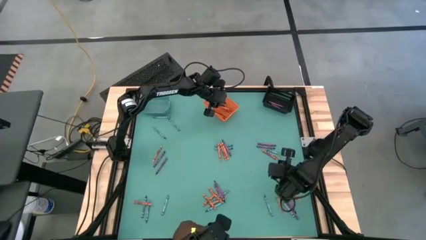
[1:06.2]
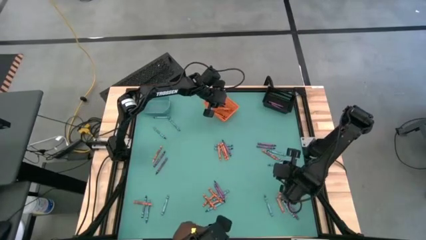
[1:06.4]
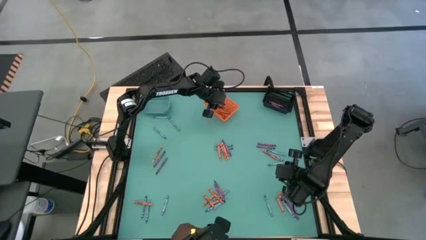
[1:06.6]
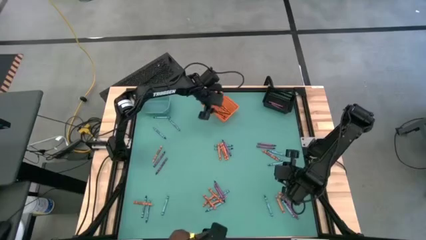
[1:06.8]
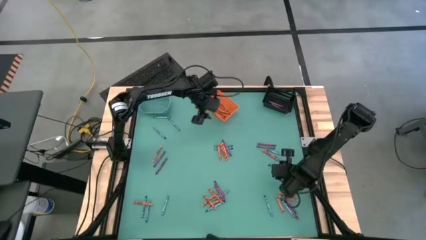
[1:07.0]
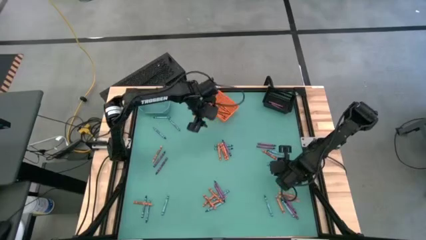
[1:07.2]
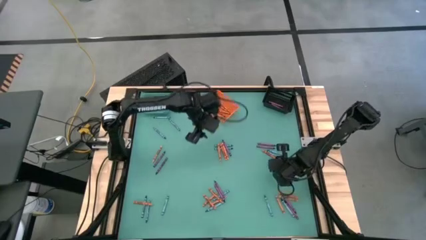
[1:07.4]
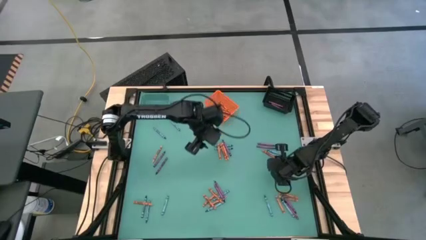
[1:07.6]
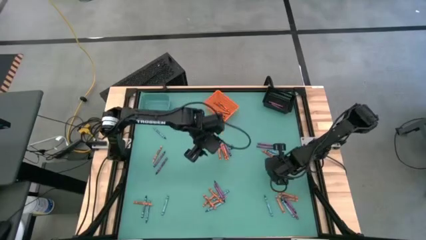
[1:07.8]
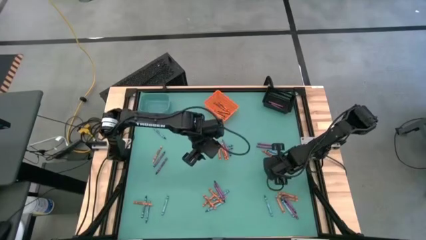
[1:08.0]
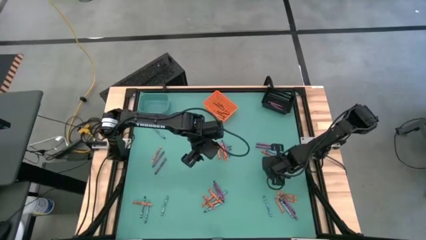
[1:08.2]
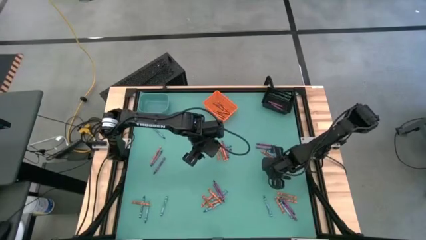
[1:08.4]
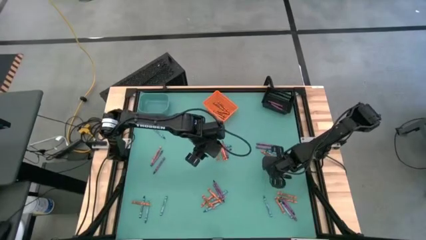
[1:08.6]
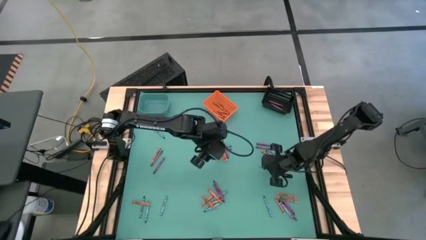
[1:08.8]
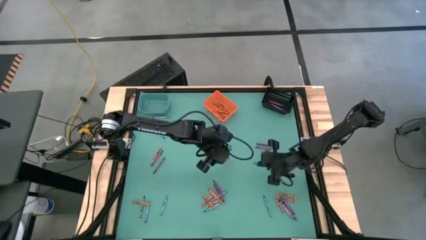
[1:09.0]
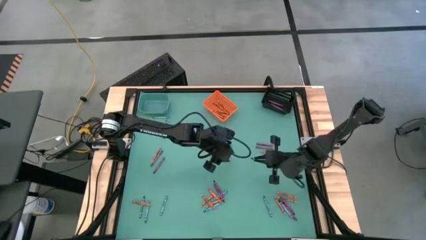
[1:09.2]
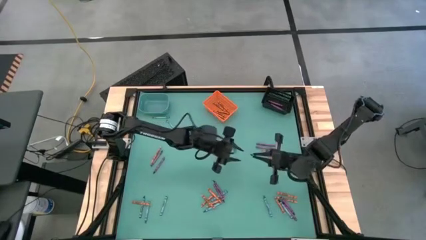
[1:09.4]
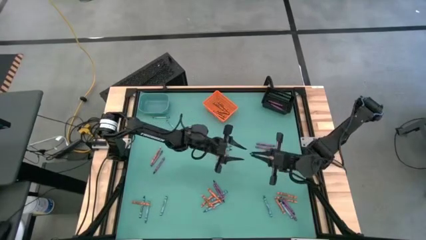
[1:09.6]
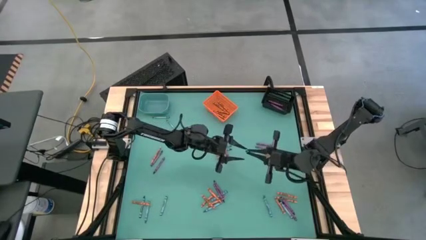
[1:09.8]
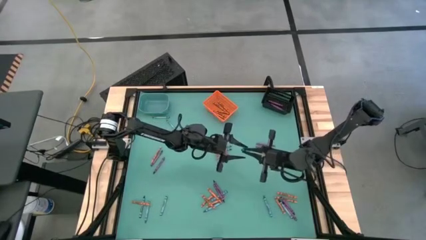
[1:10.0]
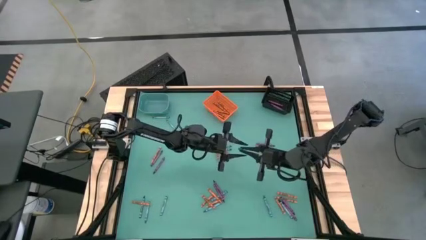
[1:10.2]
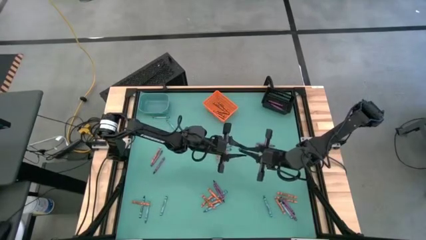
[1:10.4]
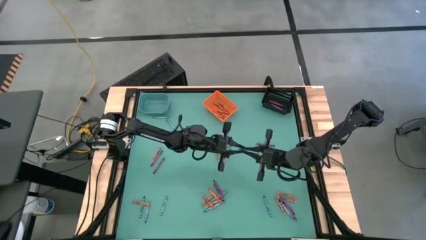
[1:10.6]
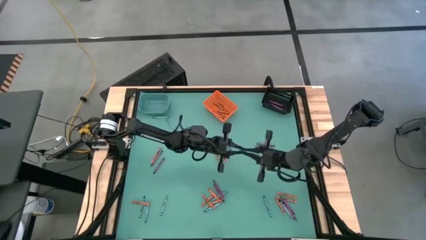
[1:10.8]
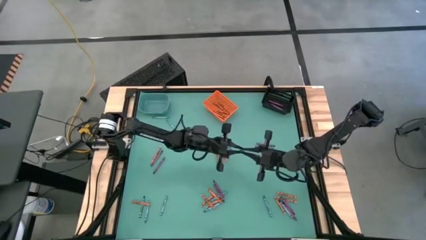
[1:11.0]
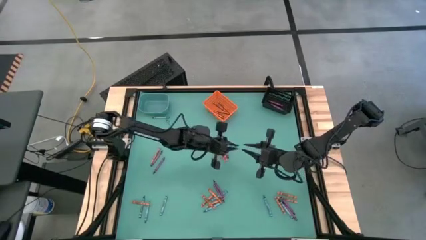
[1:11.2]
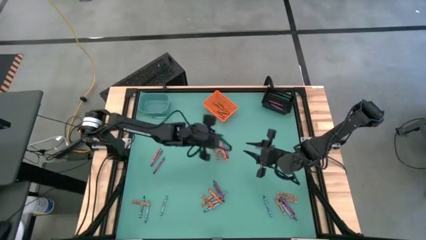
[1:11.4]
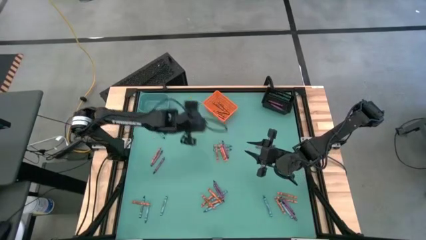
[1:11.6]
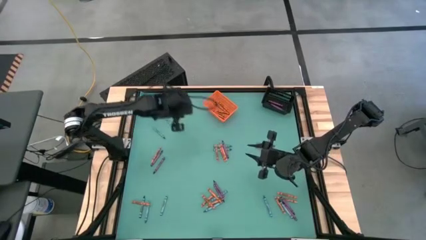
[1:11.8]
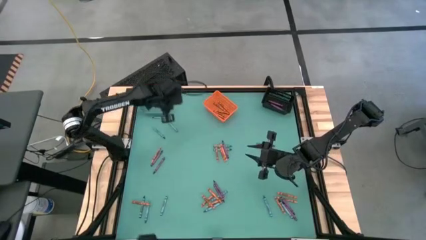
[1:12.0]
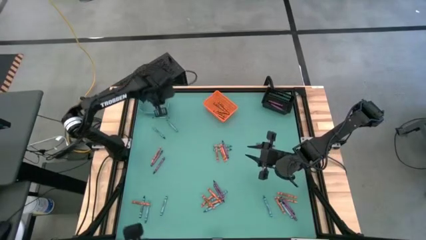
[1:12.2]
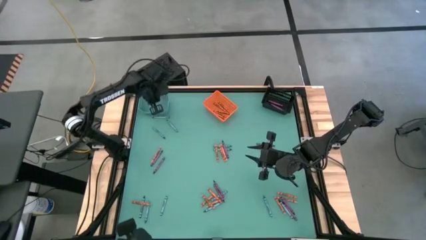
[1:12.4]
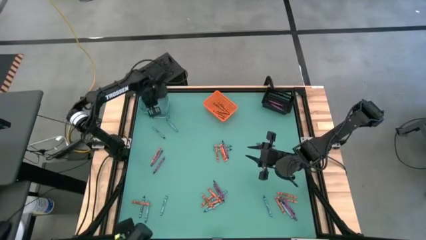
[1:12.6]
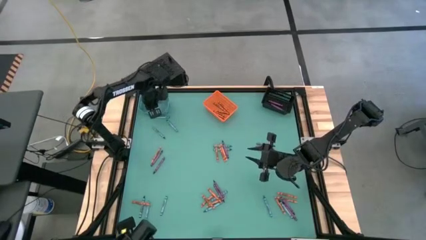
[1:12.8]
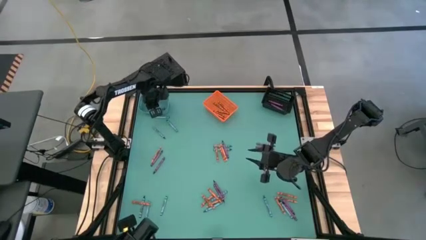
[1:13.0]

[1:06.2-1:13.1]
Task: Sort crayons
Put the blue crayon into the blue bin

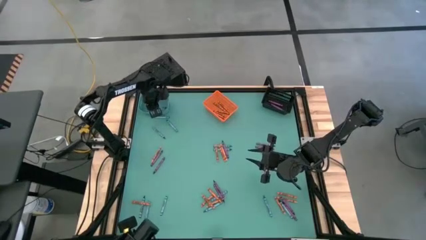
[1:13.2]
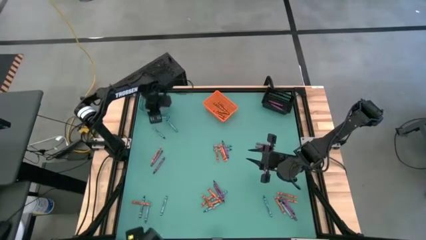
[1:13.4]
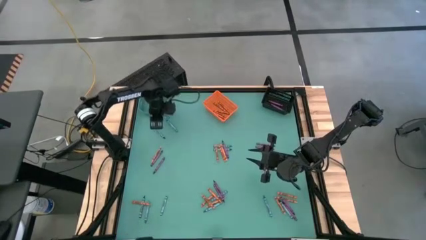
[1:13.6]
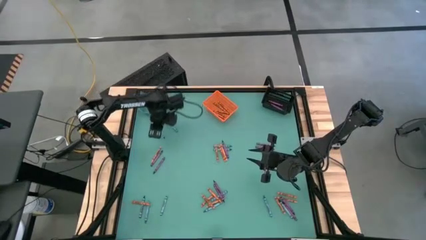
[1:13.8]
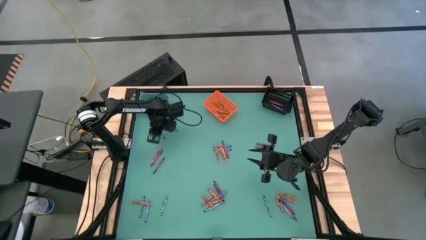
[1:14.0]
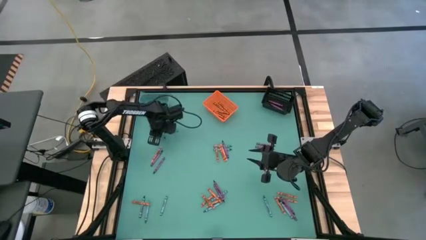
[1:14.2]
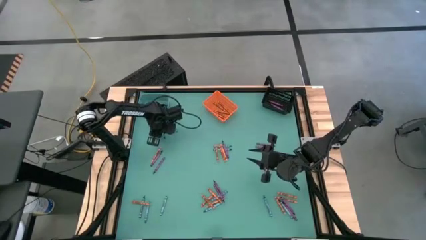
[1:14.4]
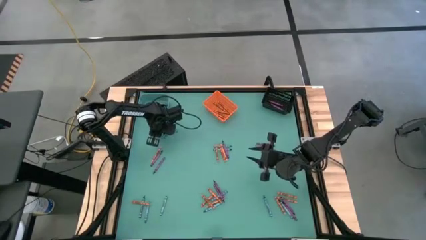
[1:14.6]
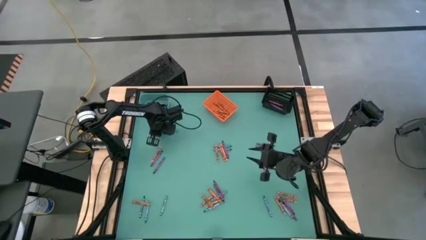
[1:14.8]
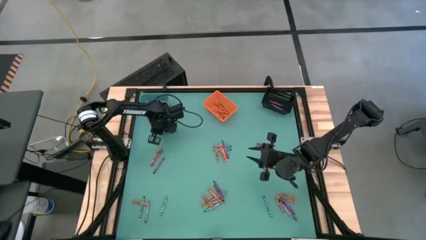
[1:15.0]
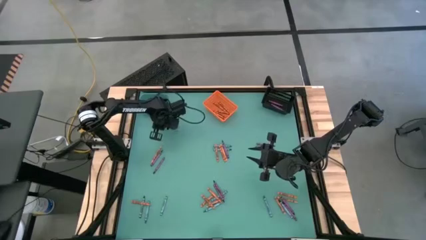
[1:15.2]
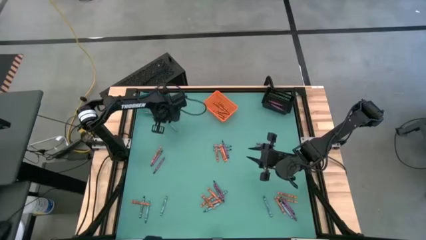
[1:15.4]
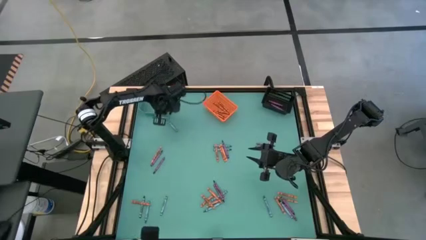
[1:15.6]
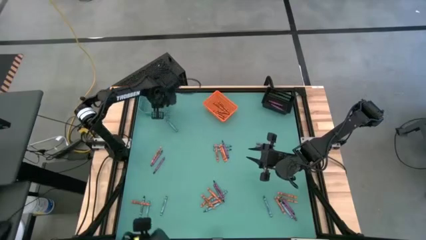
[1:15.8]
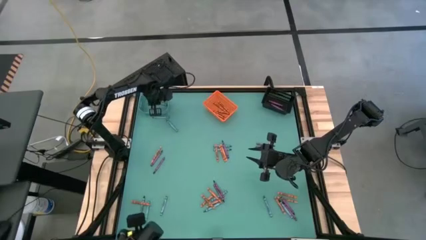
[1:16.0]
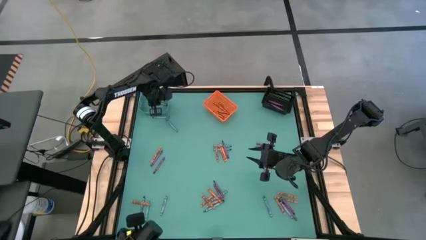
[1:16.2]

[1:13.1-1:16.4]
Put the blue crayon into the blue bin

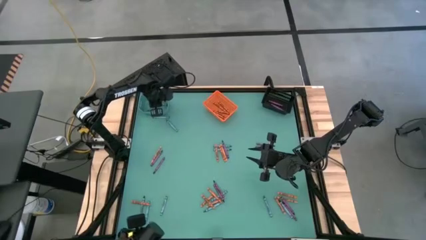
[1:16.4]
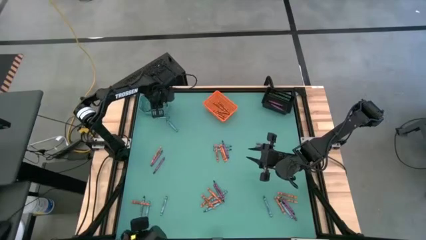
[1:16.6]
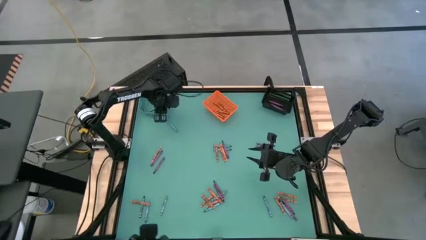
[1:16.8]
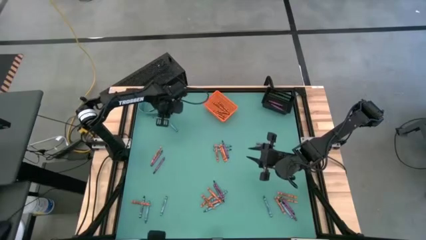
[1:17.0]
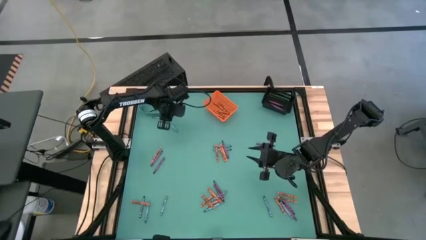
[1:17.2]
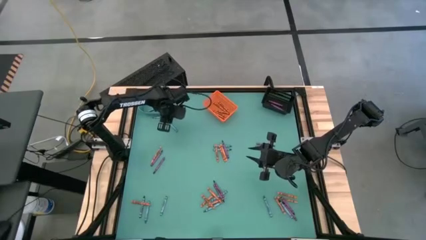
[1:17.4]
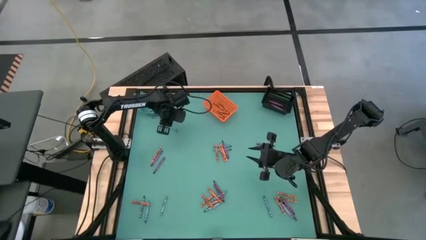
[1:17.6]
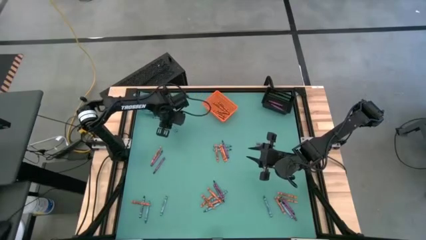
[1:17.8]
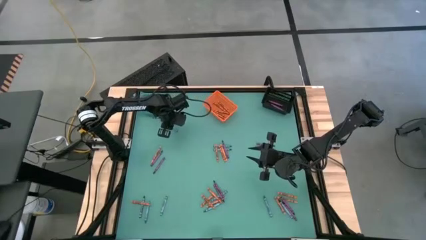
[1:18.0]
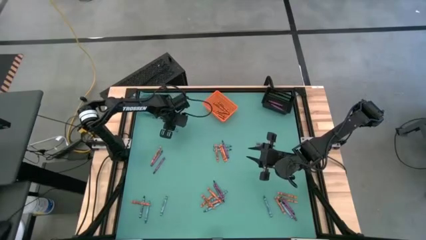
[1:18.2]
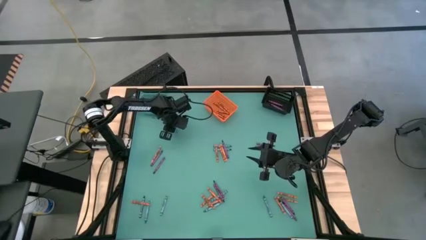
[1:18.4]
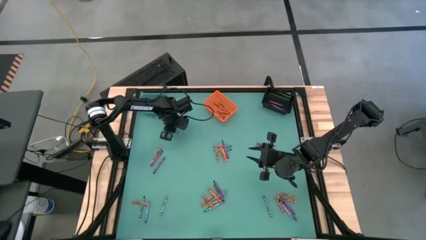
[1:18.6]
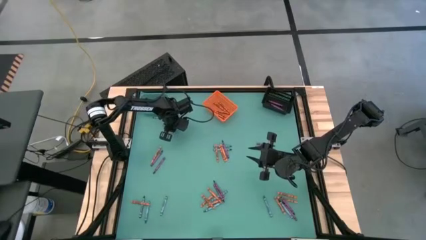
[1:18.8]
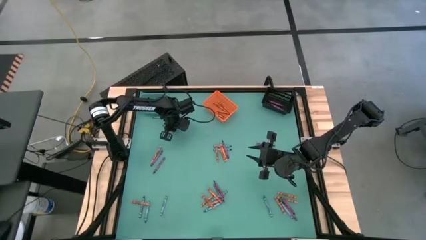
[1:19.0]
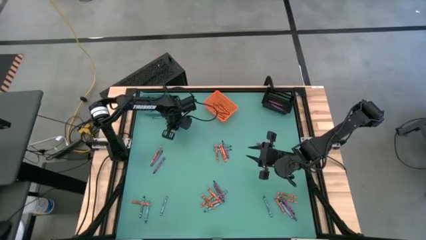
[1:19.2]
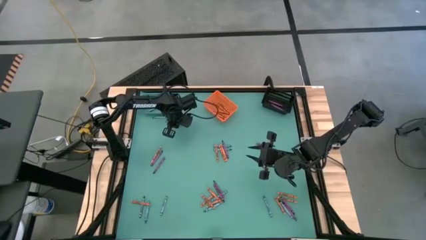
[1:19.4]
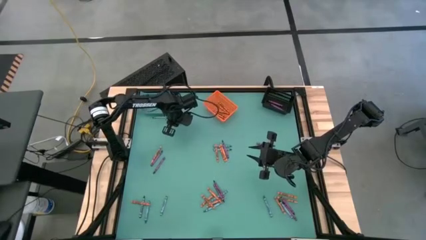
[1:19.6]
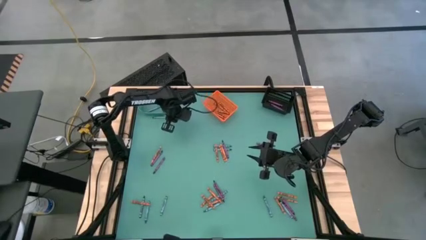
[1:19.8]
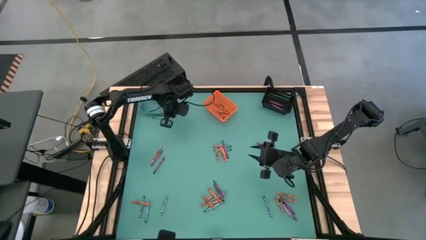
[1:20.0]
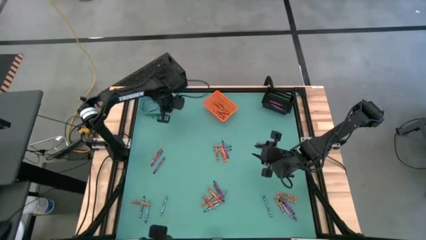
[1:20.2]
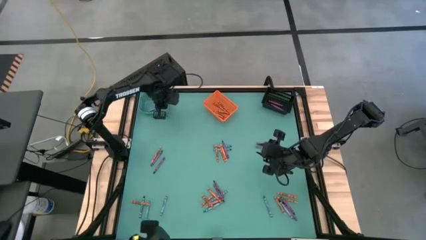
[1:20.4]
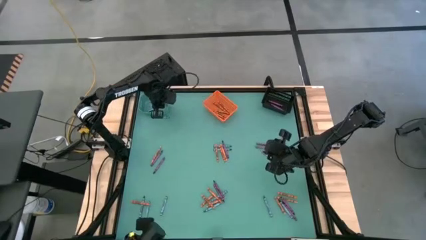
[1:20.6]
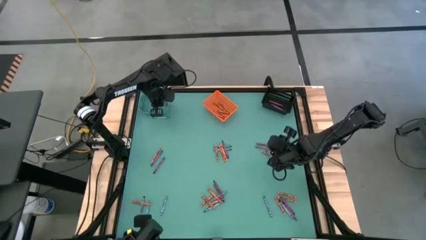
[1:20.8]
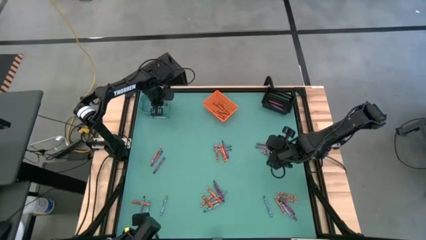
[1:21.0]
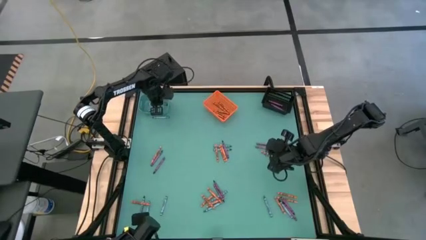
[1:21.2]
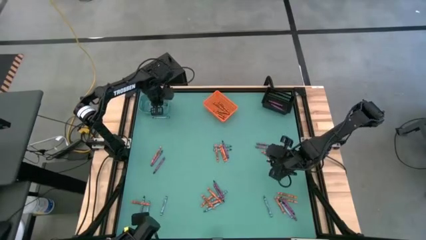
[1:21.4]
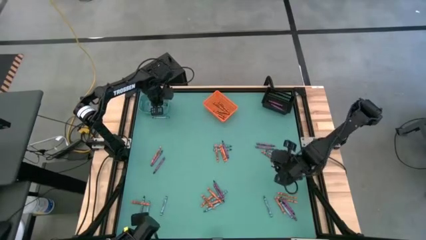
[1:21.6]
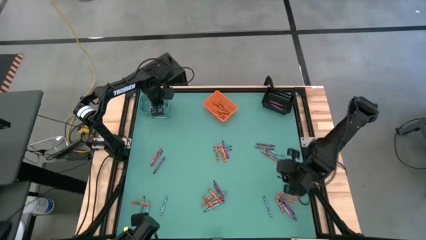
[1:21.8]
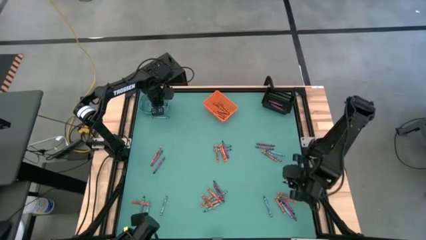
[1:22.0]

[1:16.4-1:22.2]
Put the blue crayon into the blue bin
